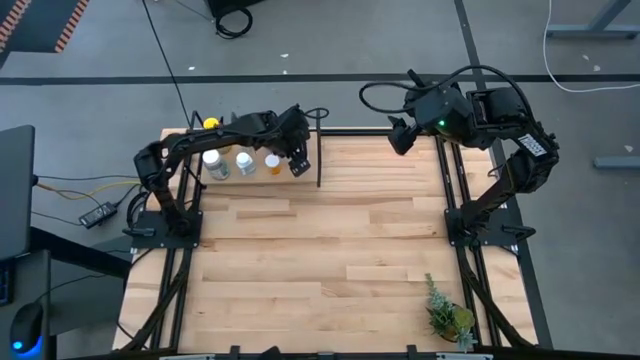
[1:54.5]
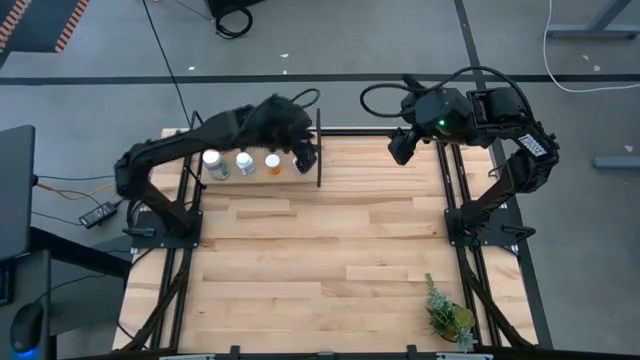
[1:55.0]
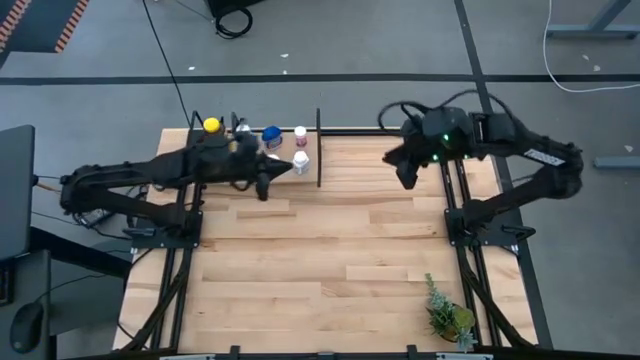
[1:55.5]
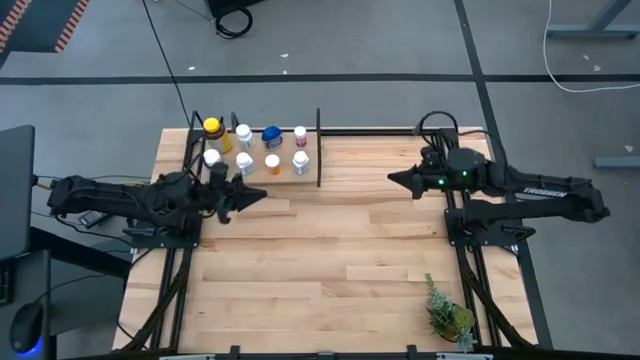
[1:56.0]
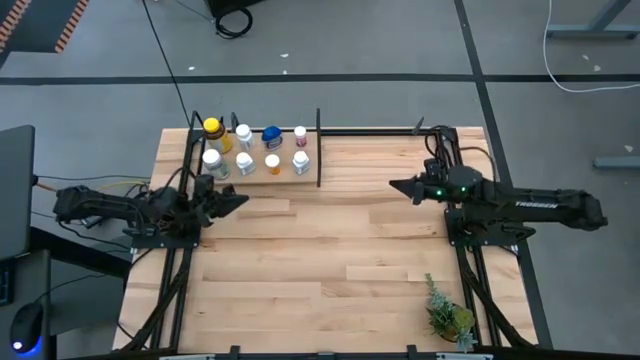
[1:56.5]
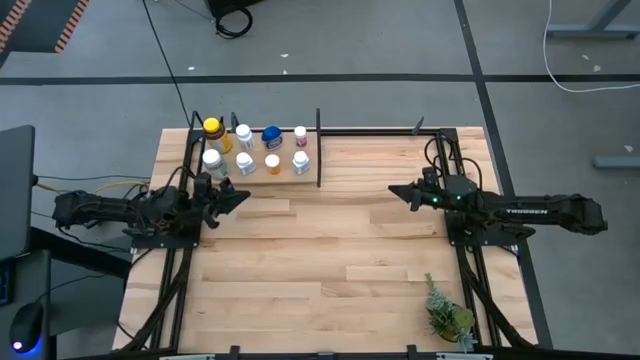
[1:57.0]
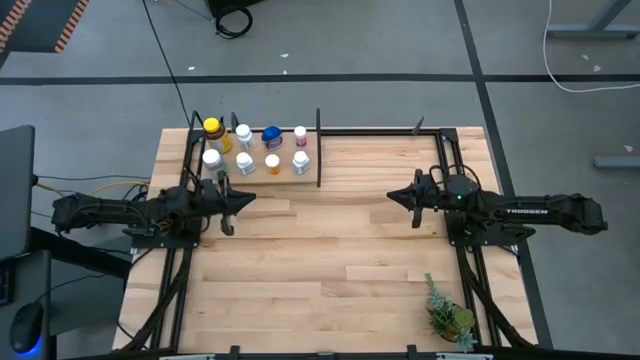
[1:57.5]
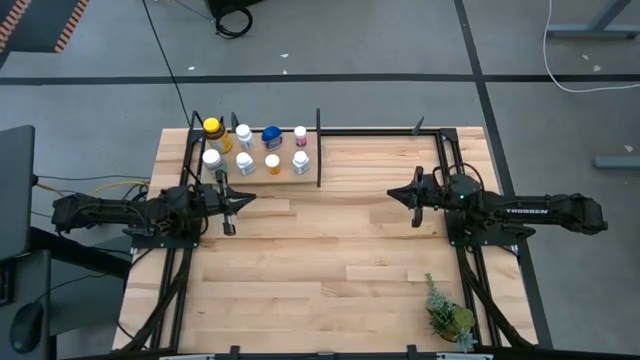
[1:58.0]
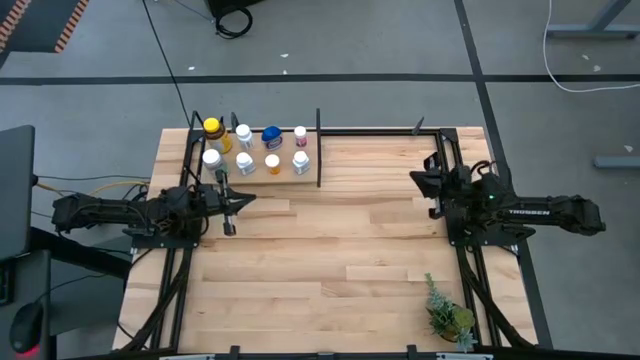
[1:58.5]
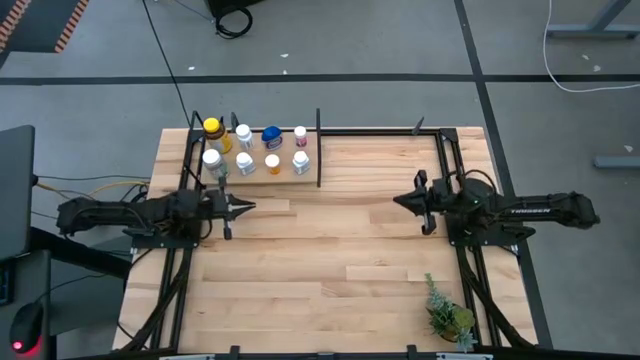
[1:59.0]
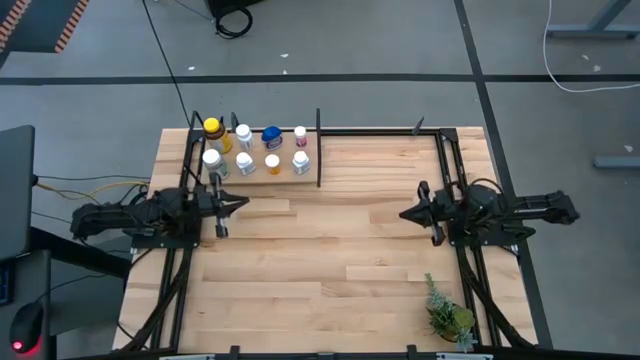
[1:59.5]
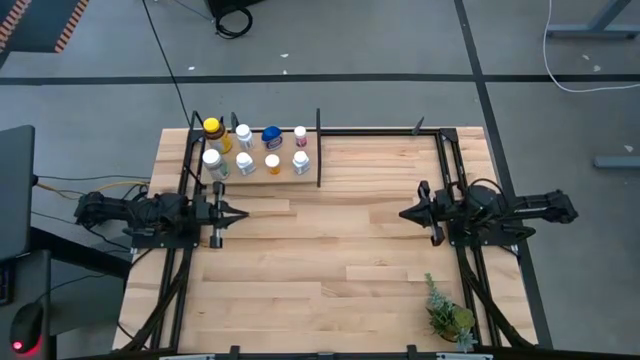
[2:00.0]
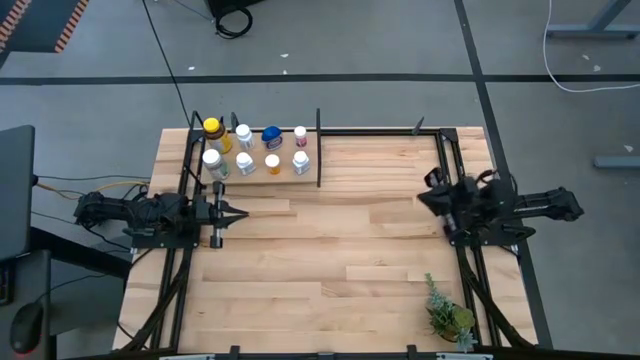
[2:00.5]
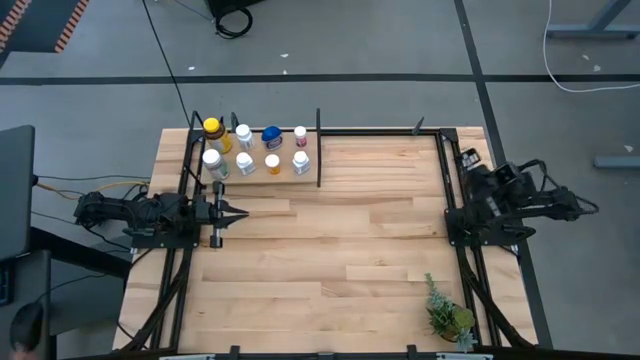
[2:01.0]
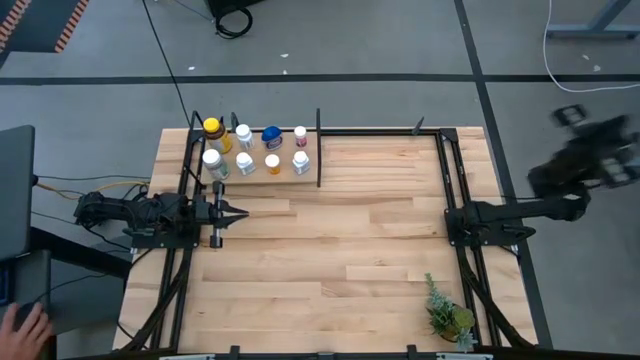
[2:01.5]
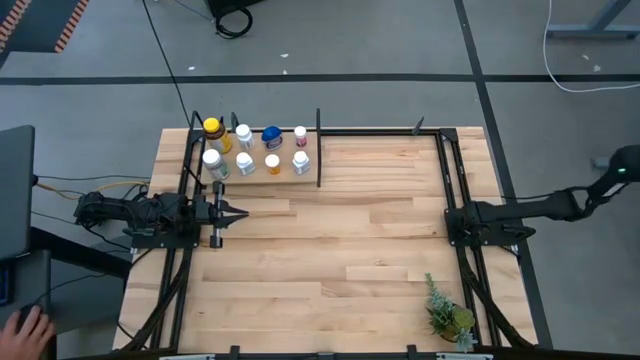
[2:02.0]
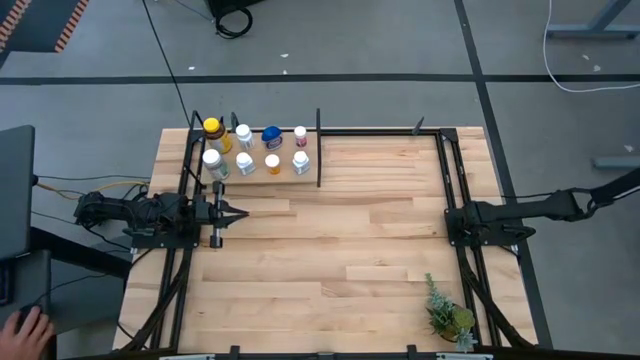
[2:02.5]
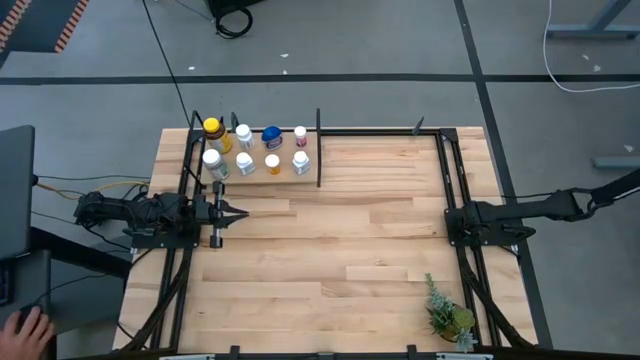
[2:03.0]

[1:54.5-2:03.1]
Task: Pick and place medicine bottles onto shelf by color
Return to Home Position

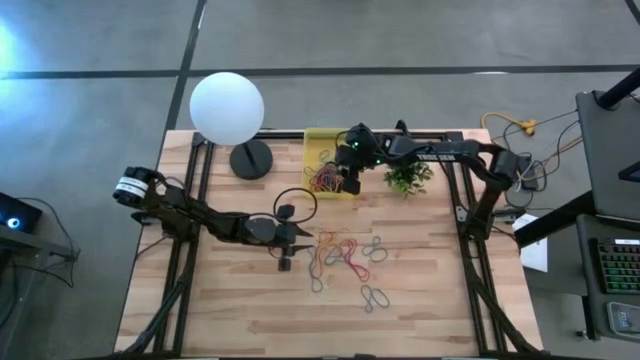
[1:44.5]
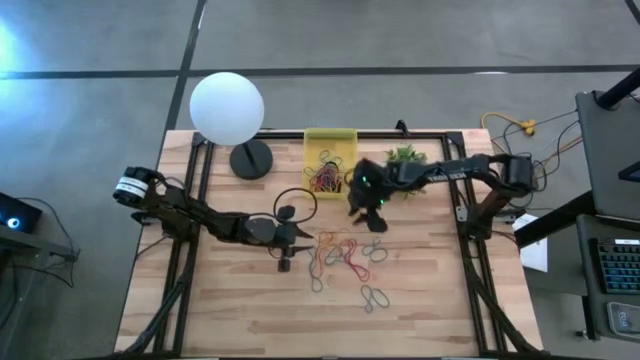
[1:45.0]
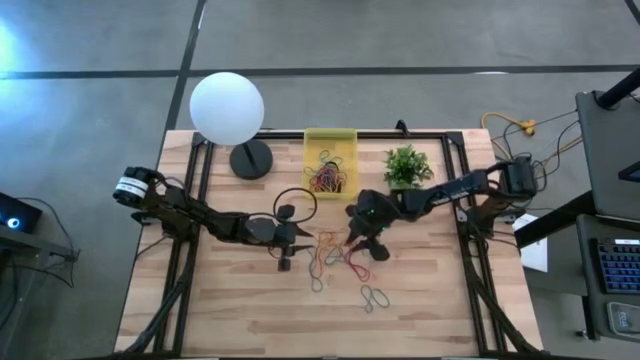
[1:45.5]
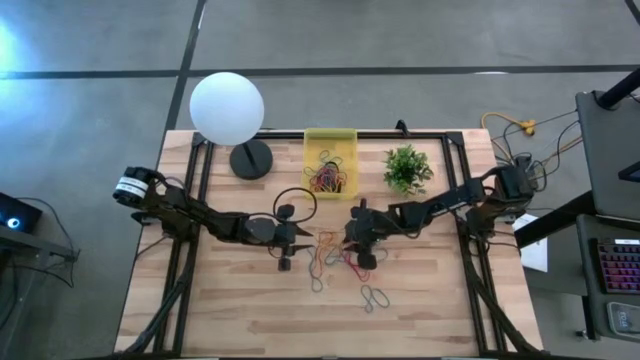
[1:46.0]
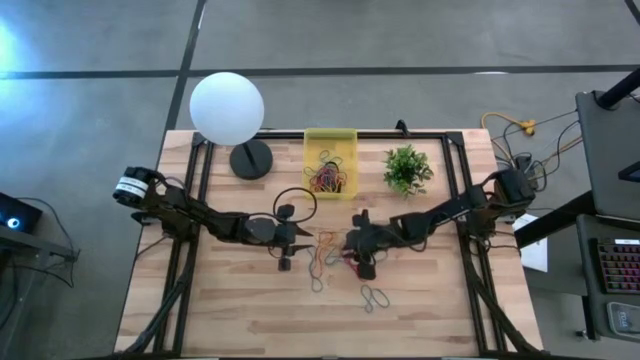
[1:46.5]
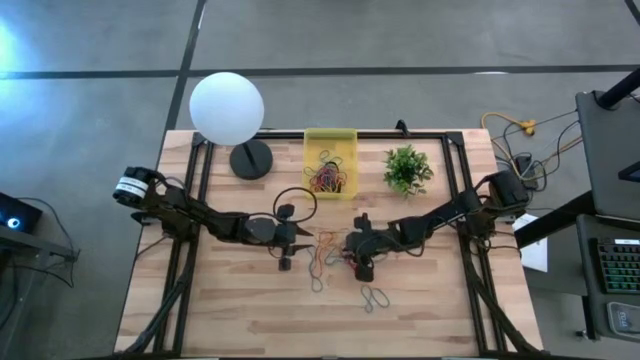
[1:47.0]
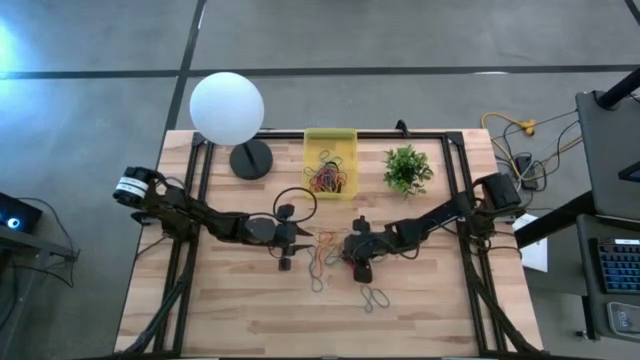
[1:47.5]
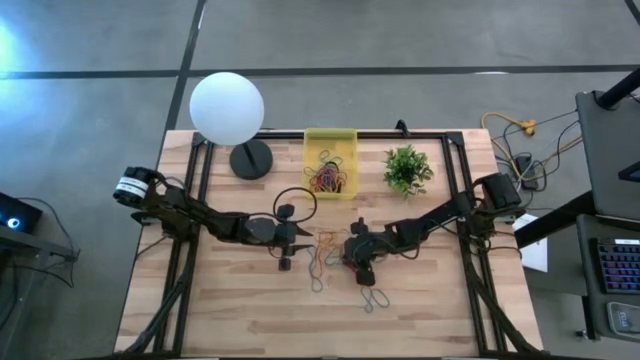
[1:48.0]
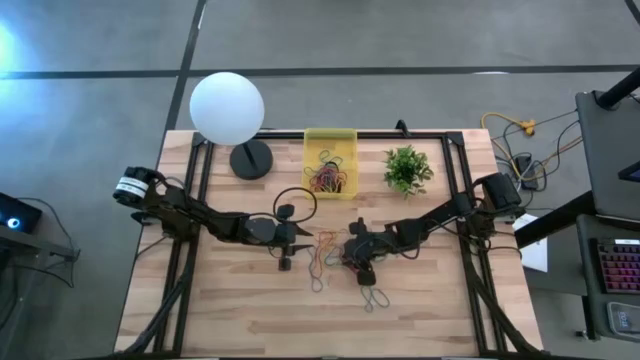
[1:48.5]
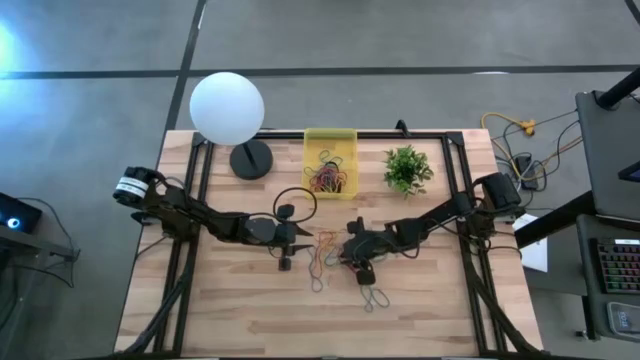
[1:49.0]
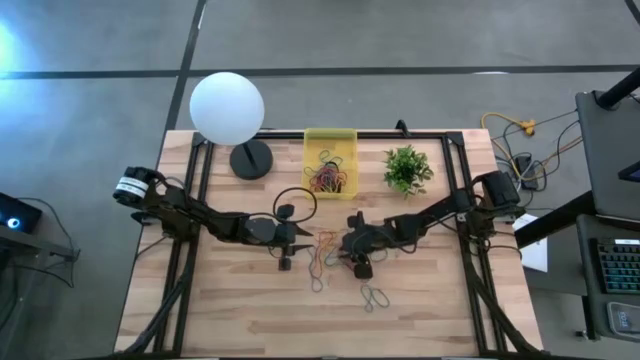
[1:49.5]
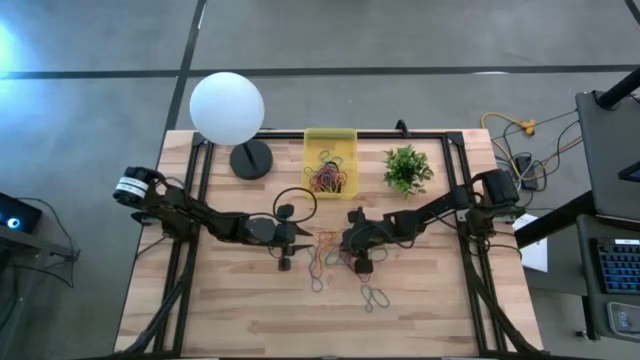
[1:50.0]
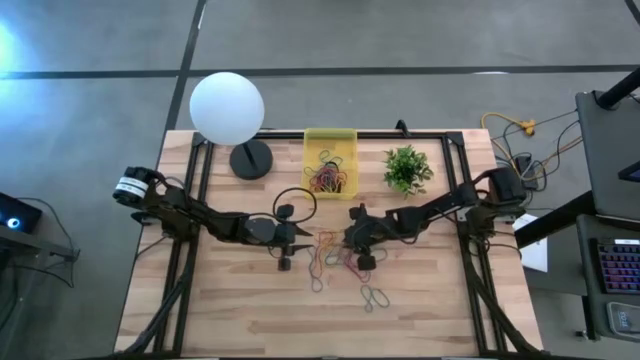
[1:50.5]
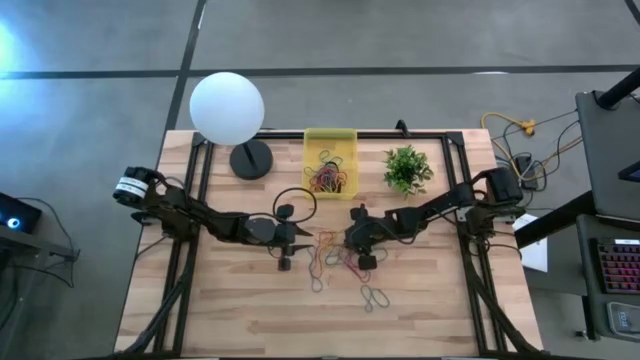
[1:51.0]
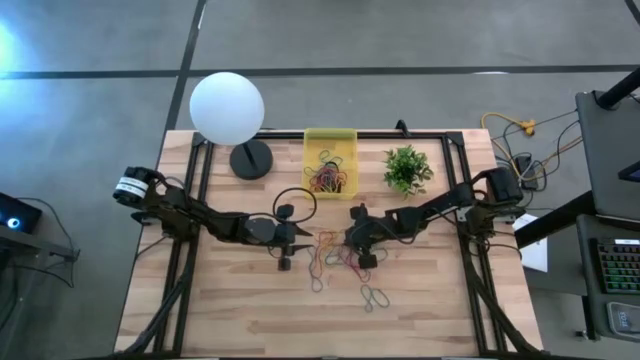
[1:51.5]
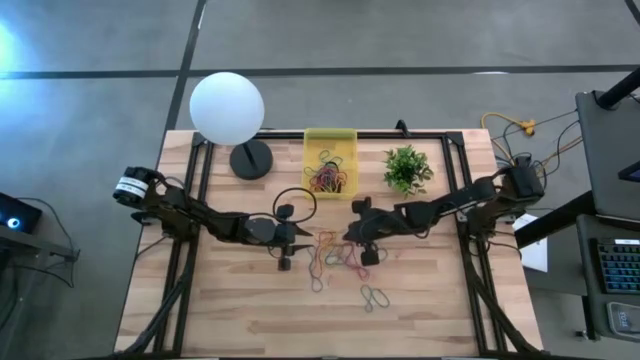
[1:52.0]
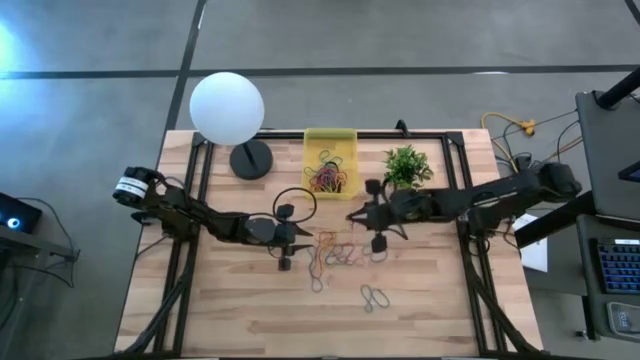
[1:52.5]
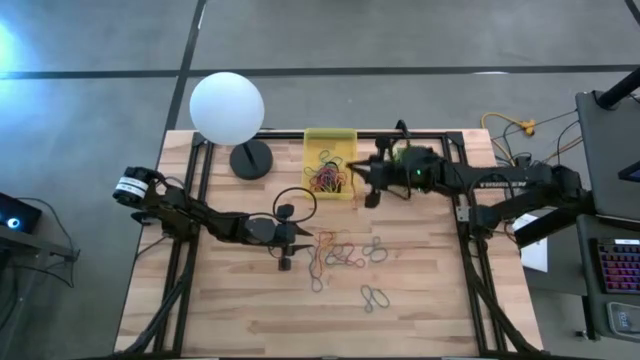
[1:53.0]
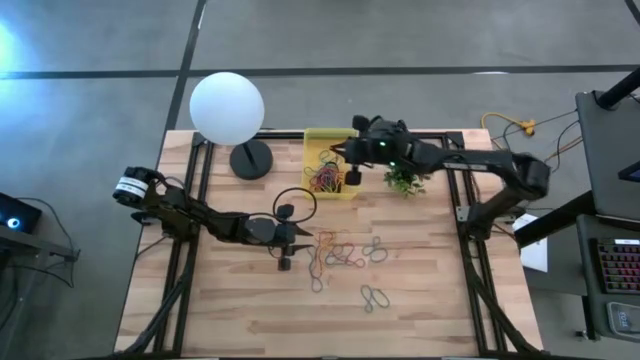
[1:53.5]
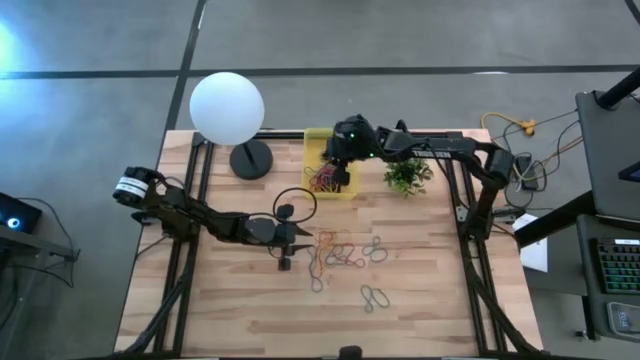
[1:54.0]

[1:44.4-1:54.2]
Task: Pick and place rubber bands into bin
Put the red rubber band into the yellow bin
